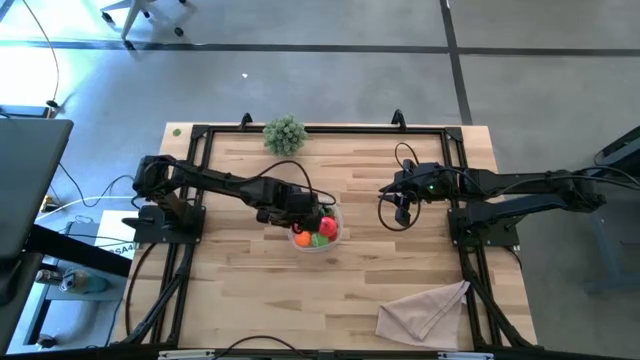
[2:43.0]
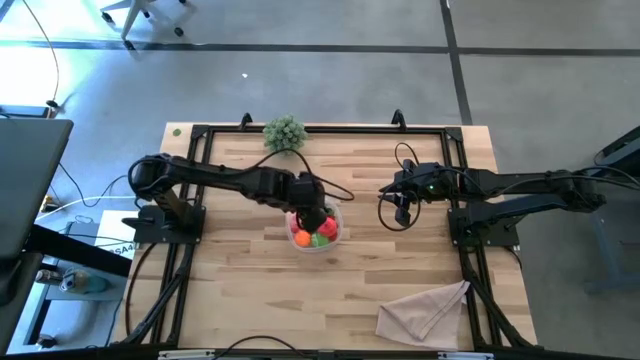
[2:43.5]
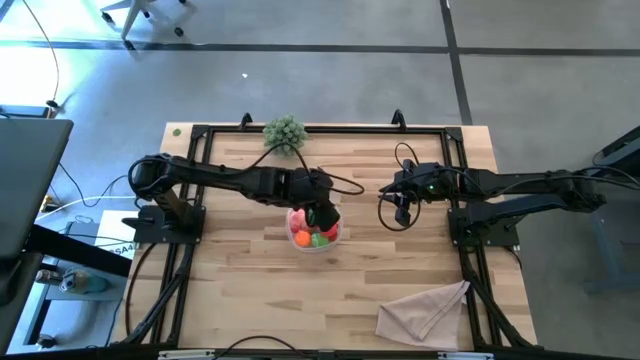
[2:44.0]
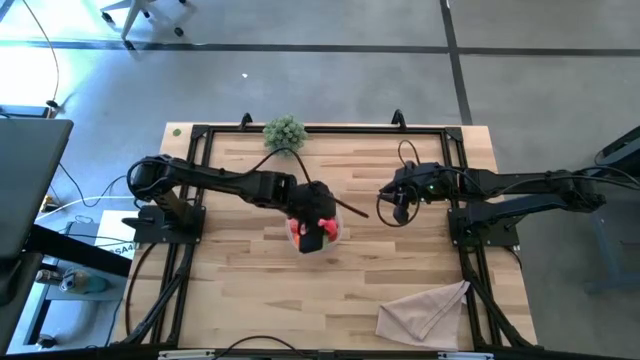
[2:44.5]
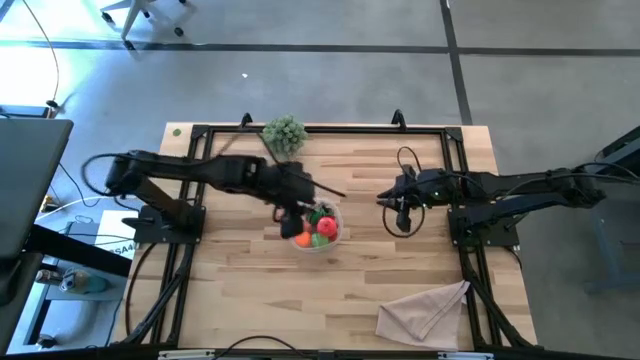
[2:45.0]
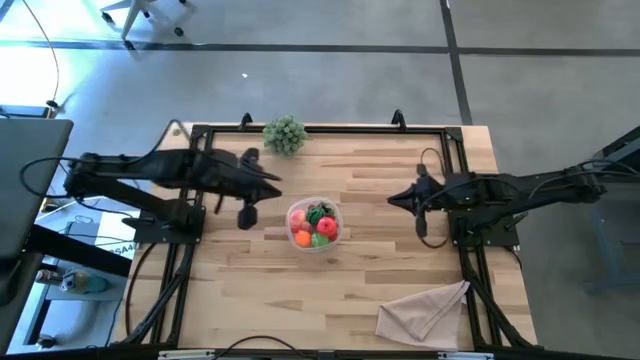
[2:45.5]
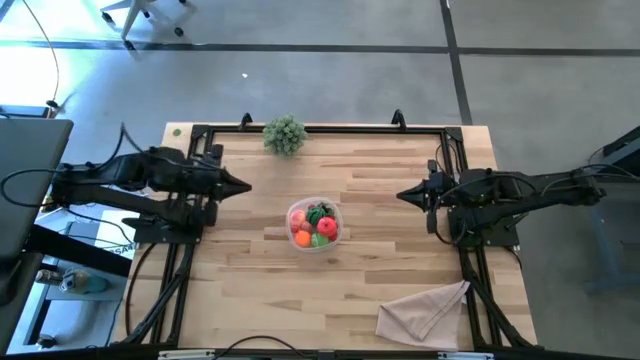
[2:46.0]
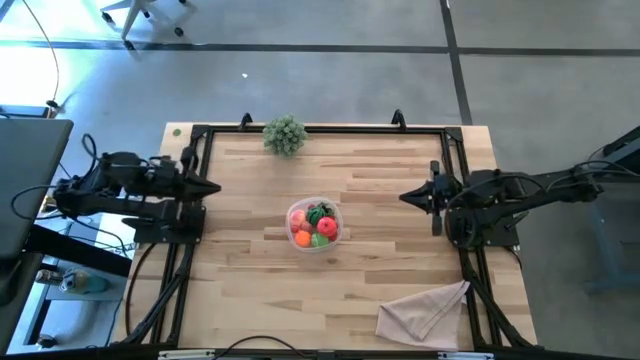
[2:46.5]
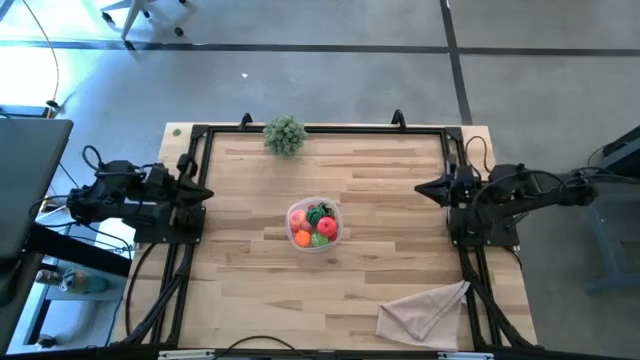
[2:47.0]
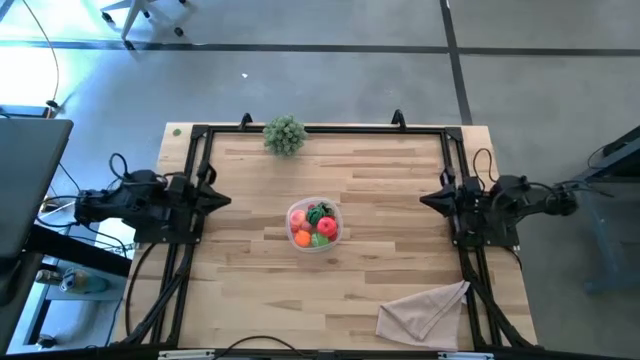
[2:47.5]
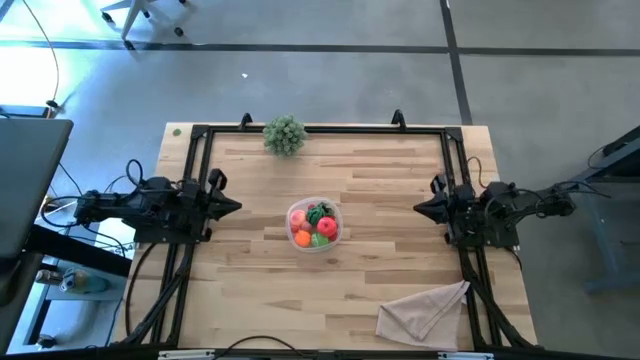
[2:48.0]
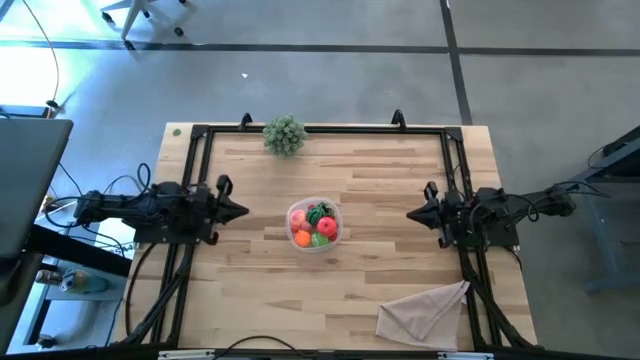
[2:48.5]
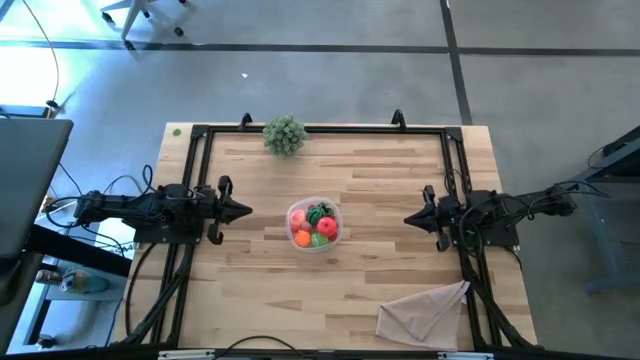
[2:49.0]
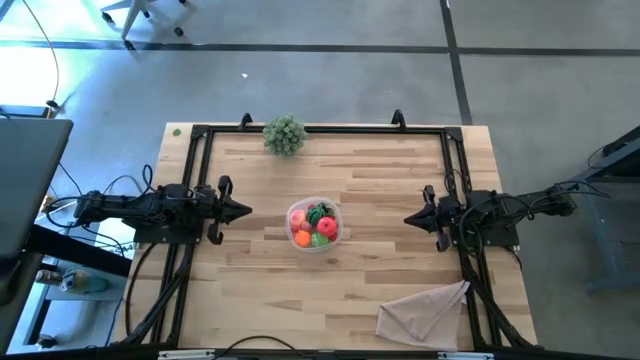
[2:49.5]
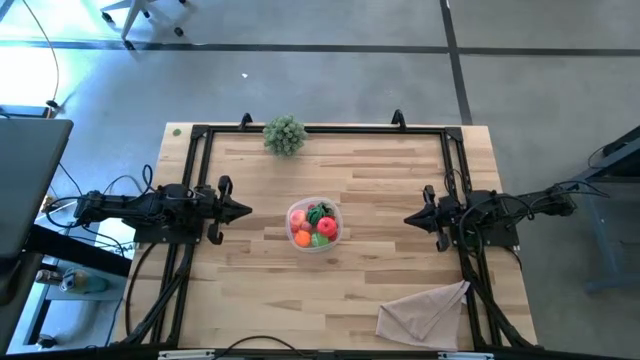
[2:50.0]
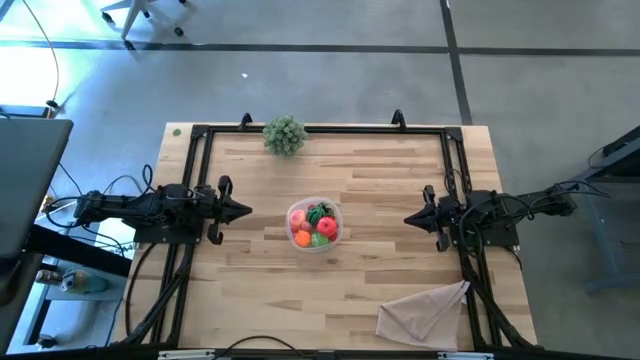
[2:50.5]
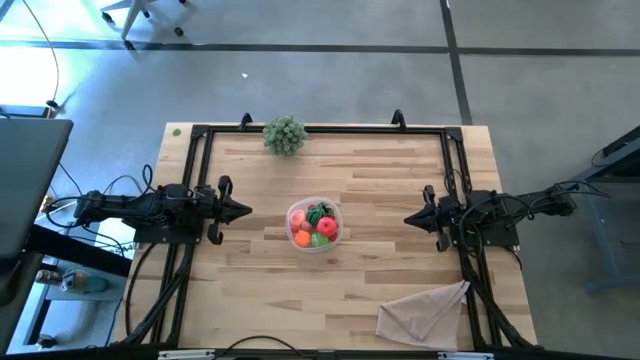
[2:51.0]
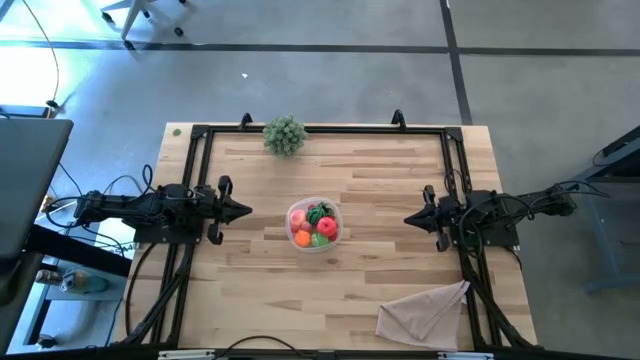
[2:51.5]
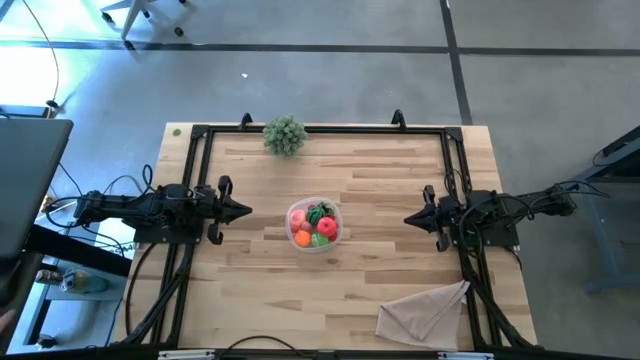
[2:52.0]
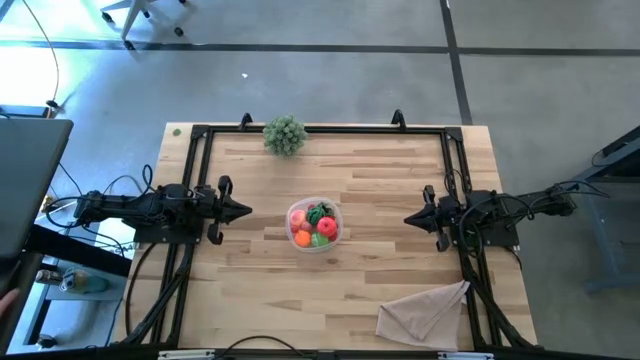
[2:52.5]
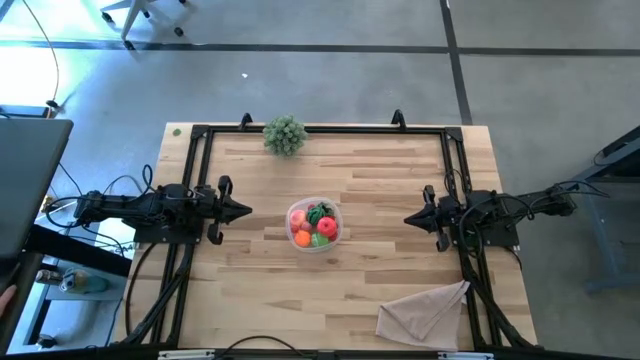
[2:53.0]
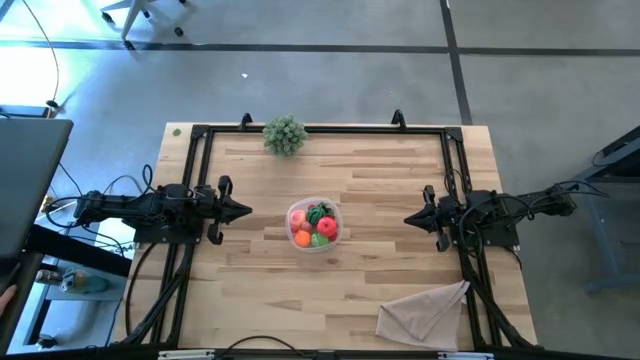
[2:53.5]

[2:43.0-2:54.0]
Task: Pick and placing Produce into tupperware
Return to Home Position

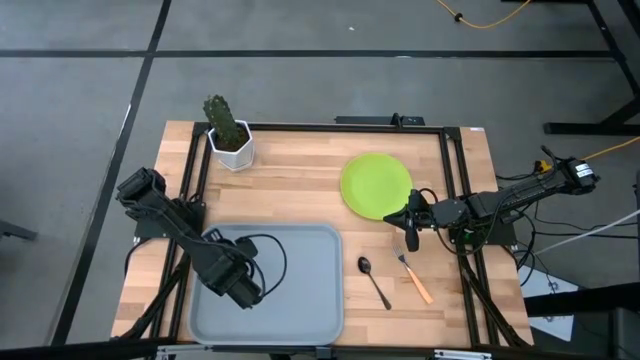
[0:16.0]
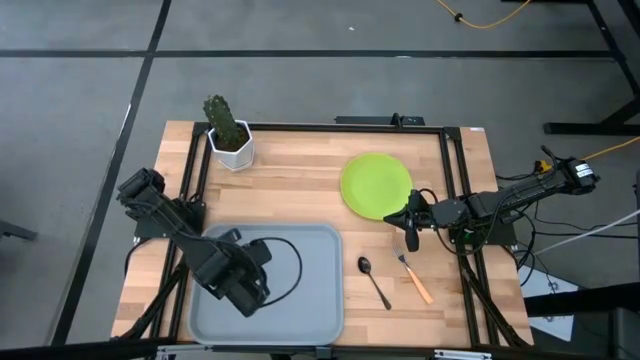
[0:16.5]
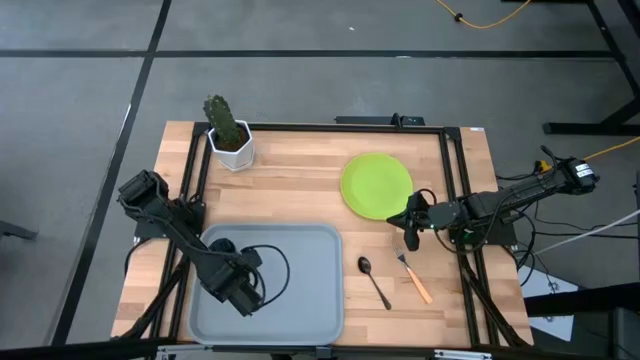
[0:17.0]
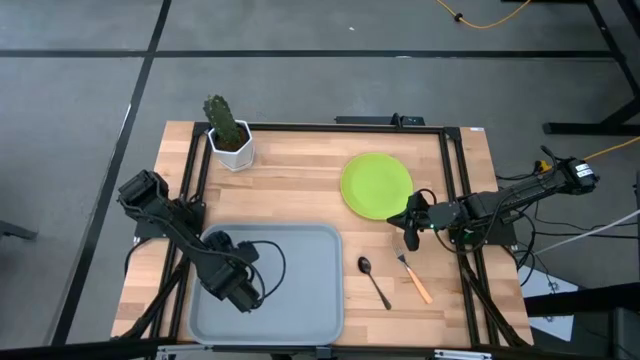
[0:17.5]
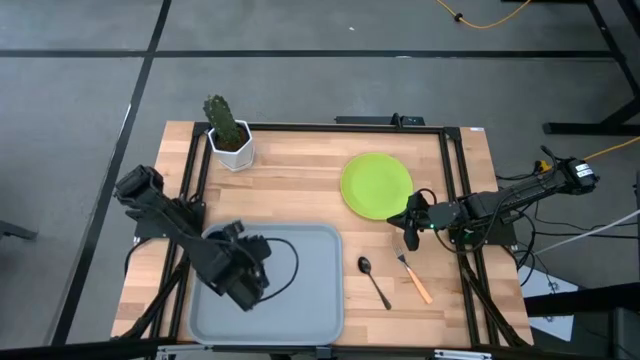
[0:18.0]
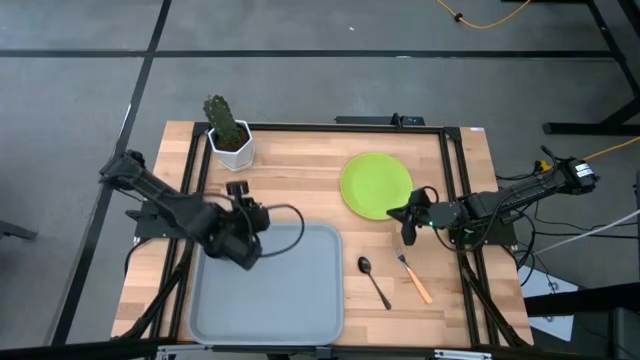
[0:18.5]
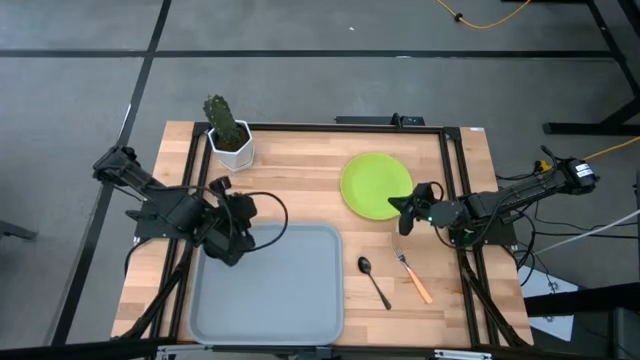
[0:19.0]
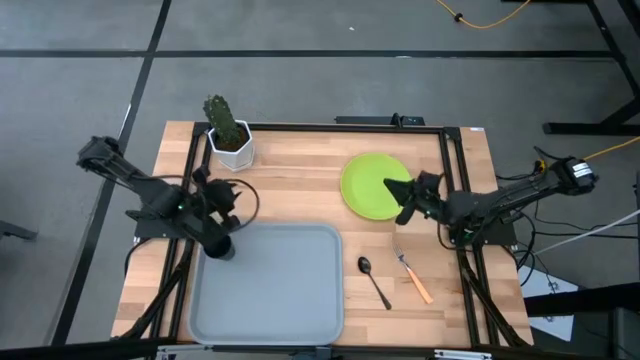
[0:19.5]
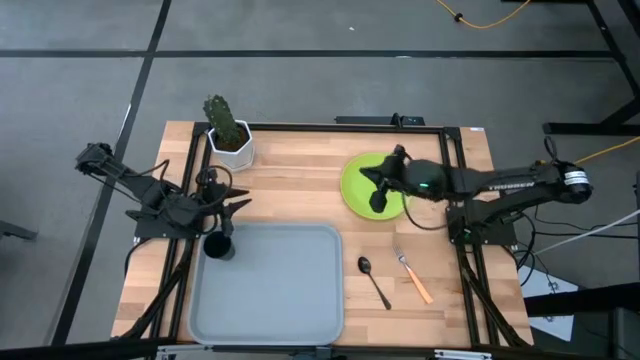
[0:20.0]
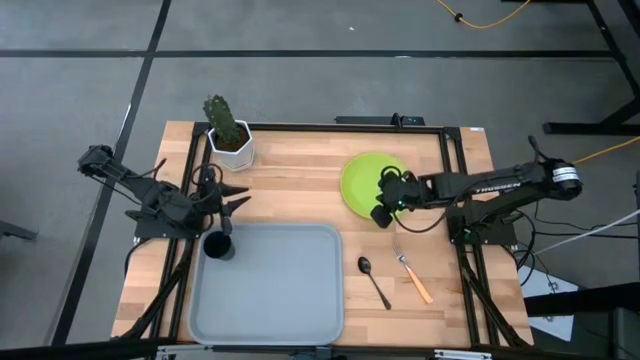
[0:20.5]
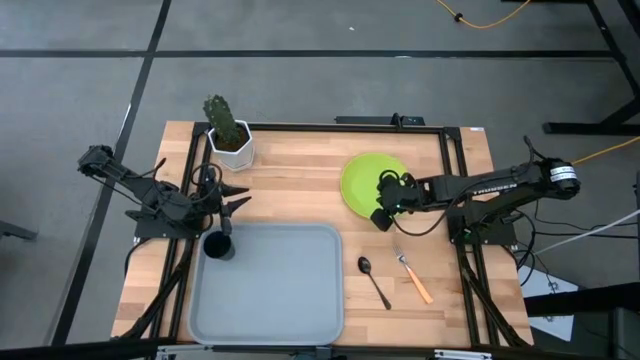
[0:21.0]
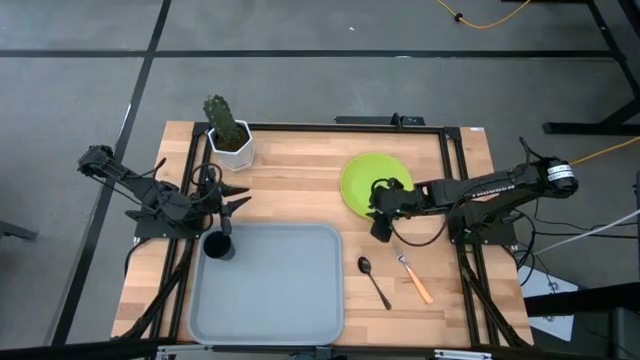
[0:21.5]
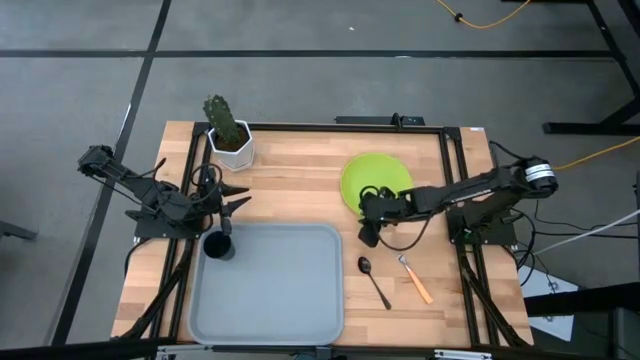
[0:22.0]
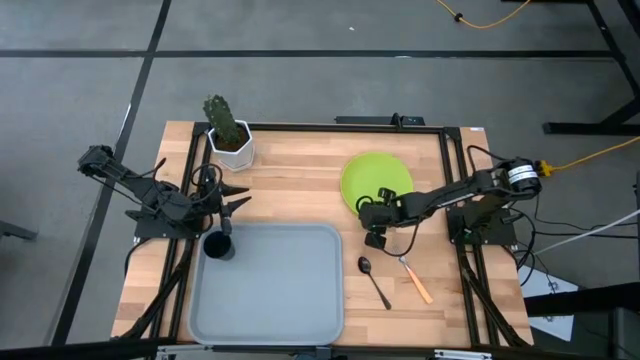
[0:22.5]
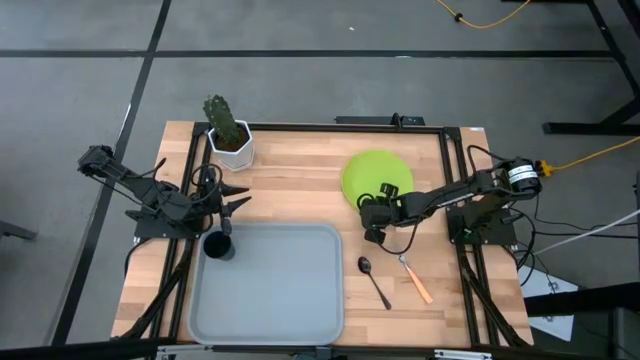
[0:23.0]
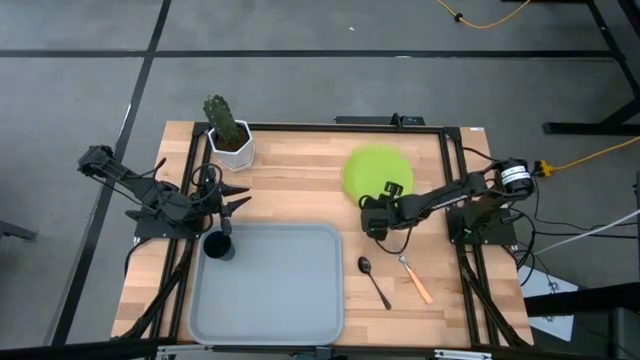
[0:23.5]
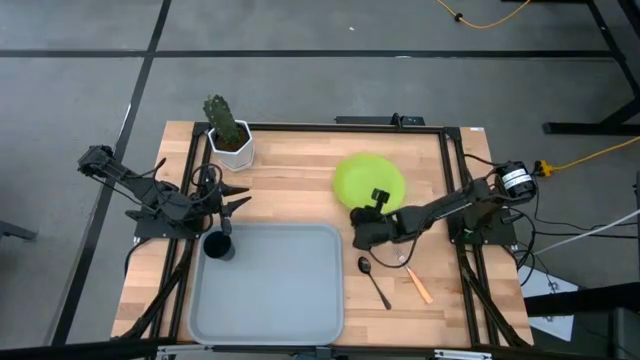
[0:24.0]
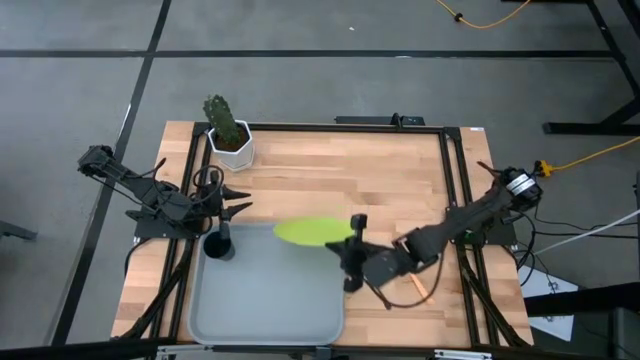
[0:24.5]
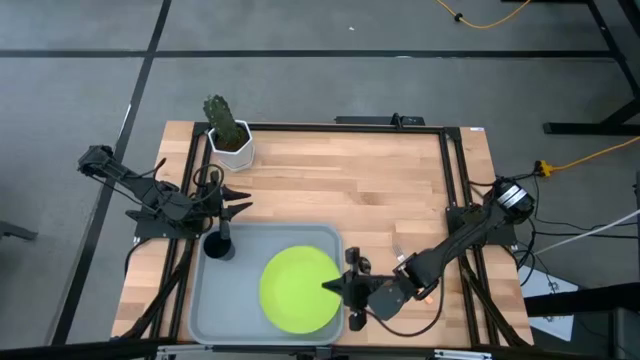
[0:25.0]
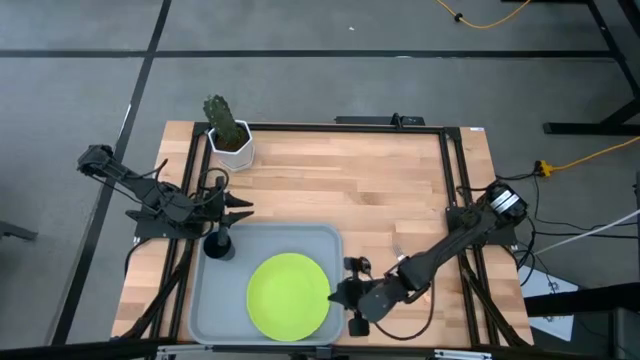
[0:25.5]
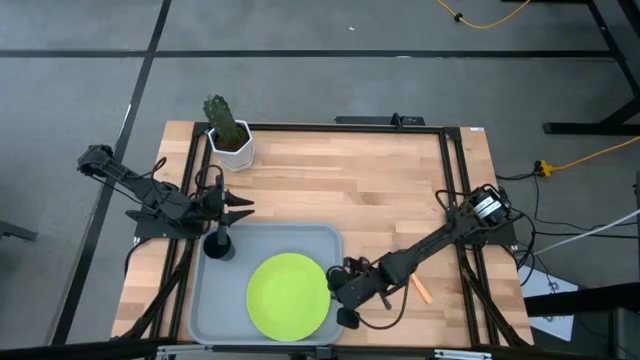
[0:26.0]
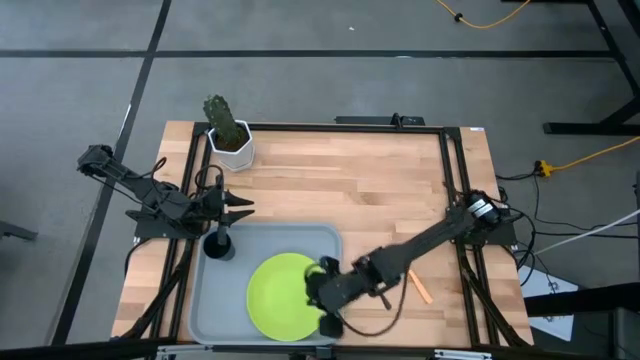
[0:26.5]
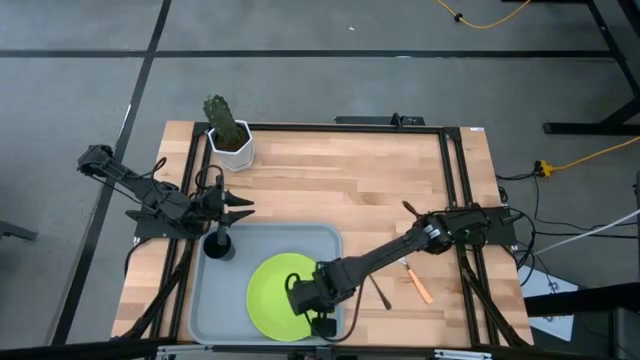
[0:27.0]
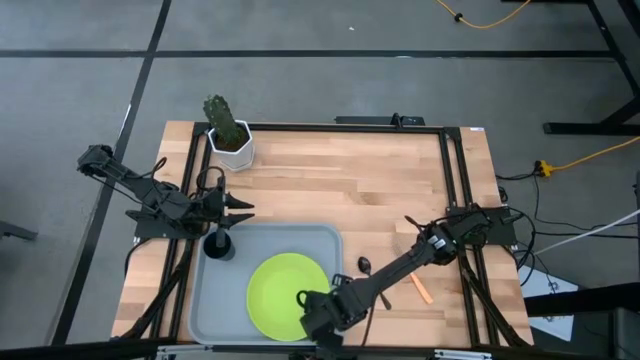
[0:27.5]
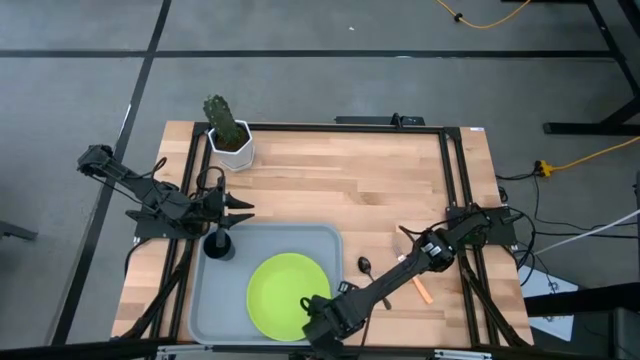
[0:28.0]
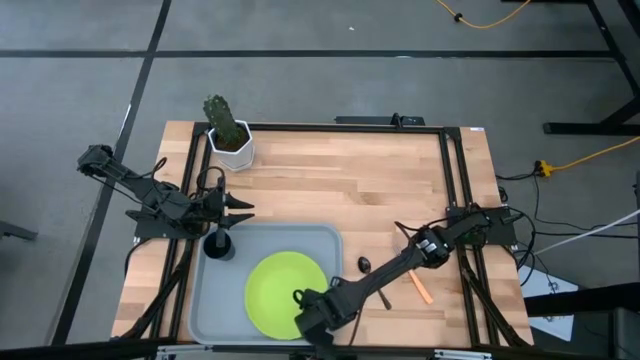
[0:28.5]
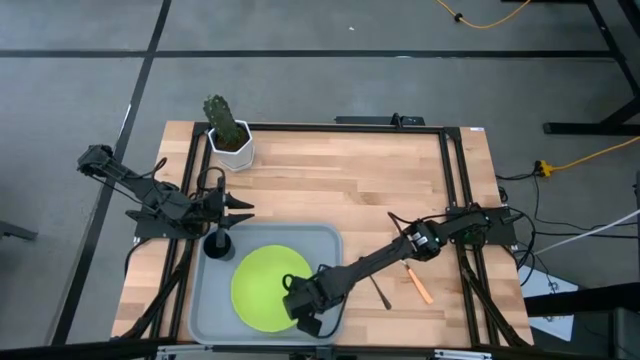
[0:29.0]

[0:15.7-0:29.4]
Task: Pick and place plate/cup/fork/spoon on tray
Put the green plate on the gray serving tray to the bottom right of the black cup
